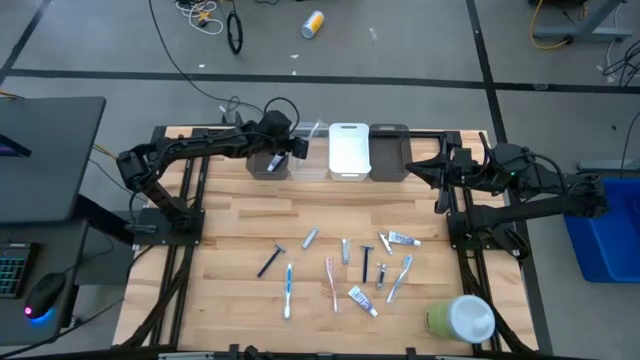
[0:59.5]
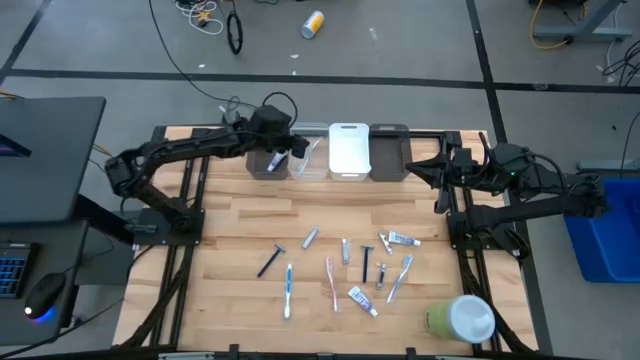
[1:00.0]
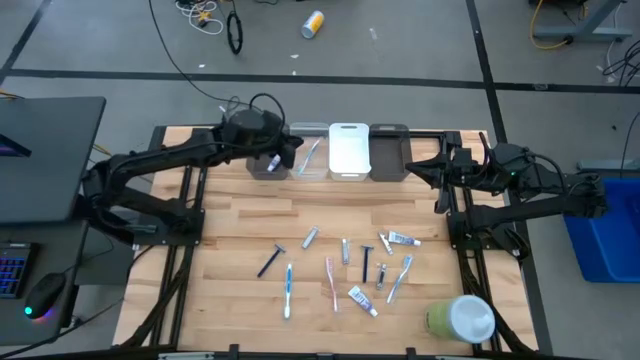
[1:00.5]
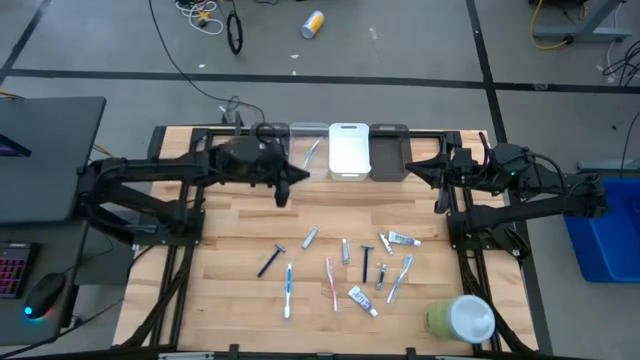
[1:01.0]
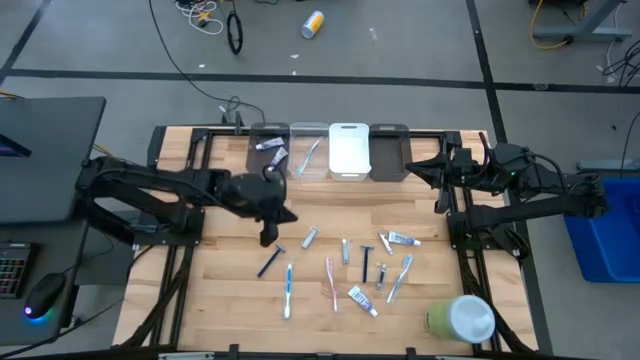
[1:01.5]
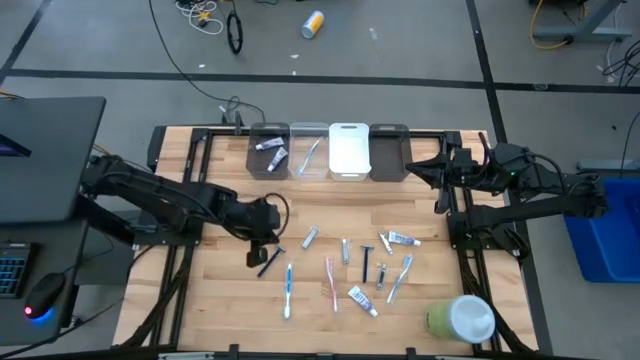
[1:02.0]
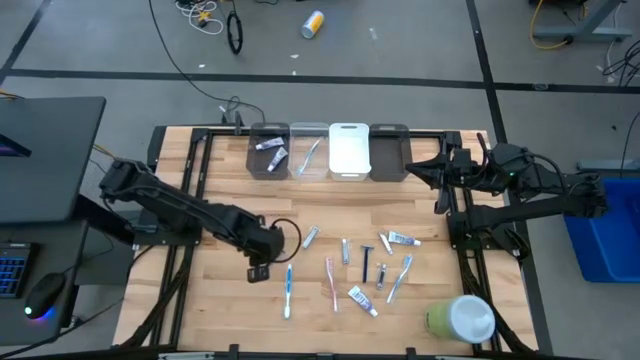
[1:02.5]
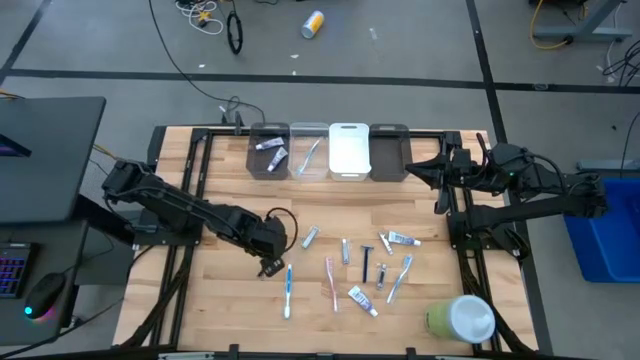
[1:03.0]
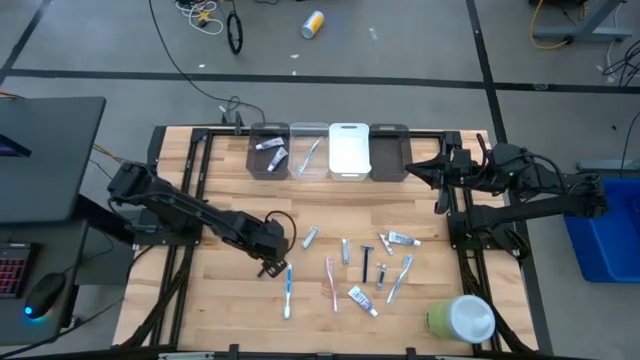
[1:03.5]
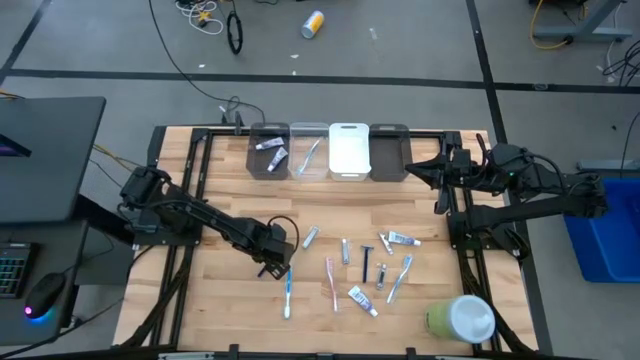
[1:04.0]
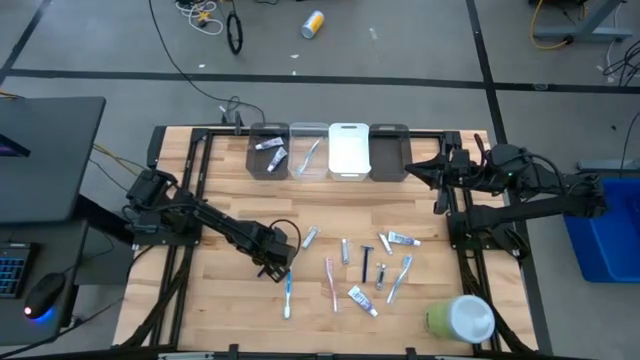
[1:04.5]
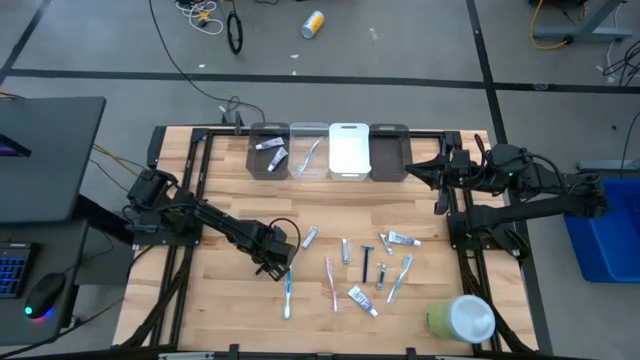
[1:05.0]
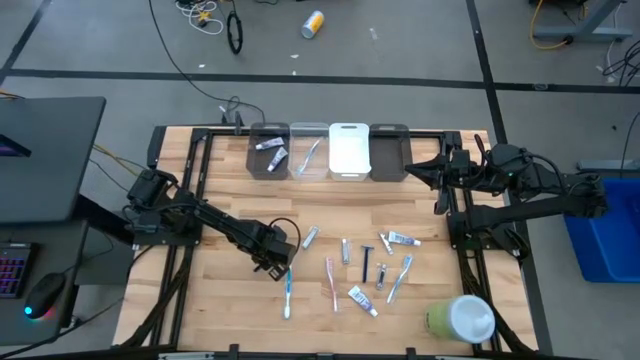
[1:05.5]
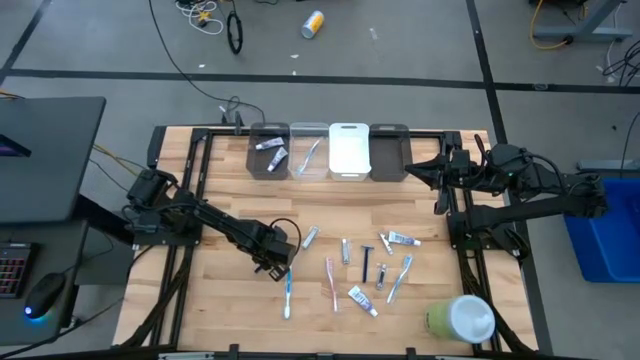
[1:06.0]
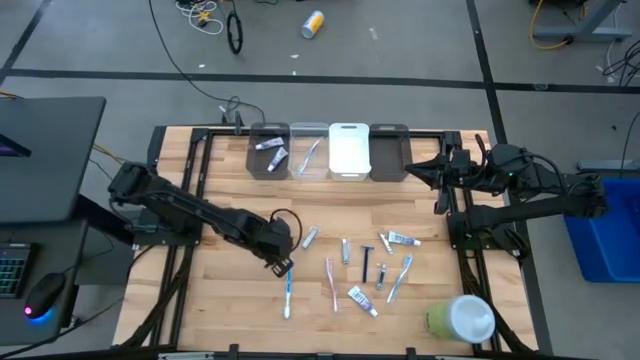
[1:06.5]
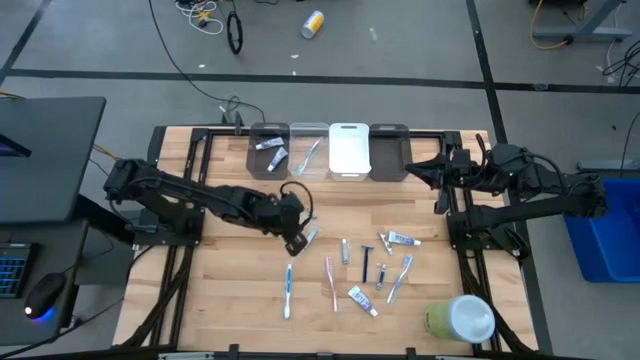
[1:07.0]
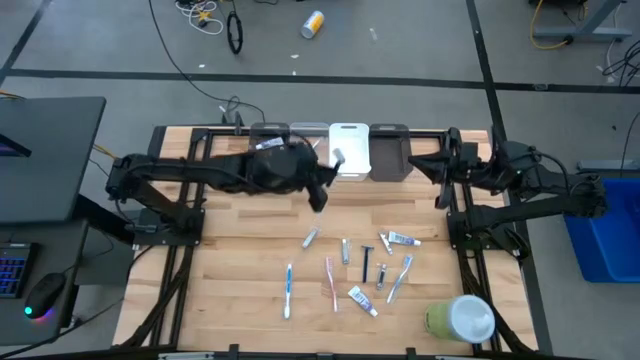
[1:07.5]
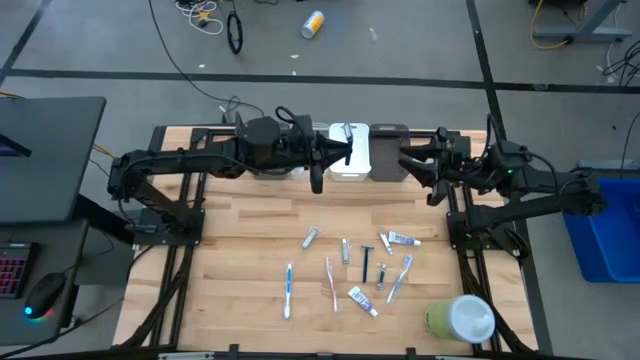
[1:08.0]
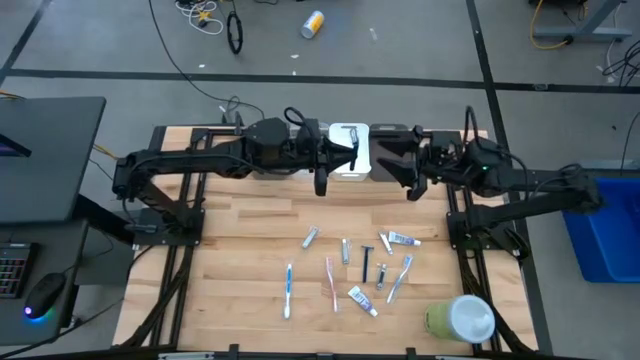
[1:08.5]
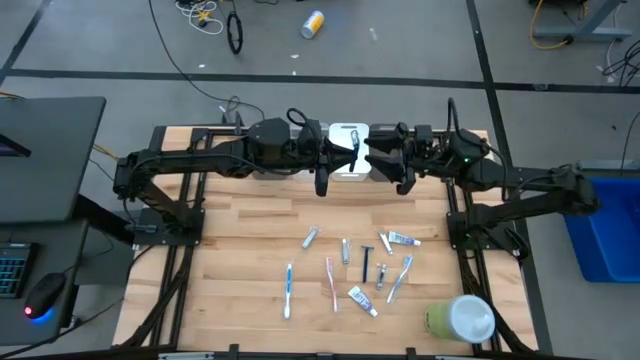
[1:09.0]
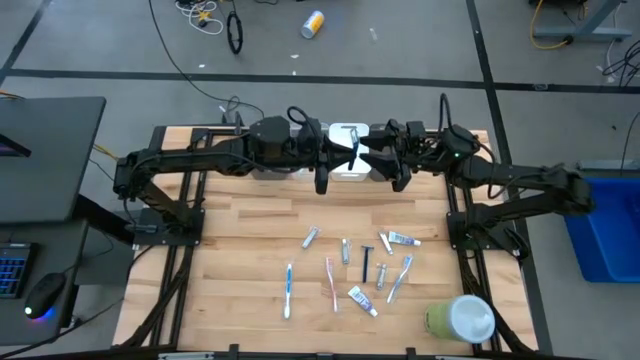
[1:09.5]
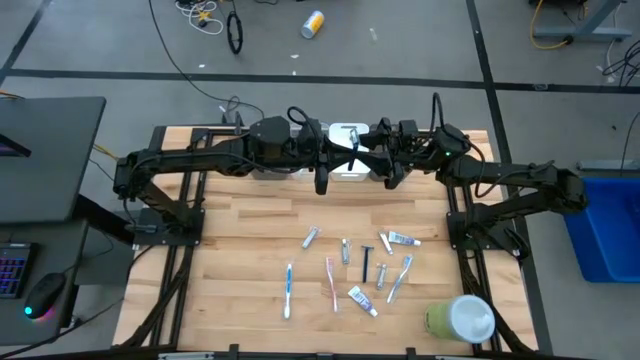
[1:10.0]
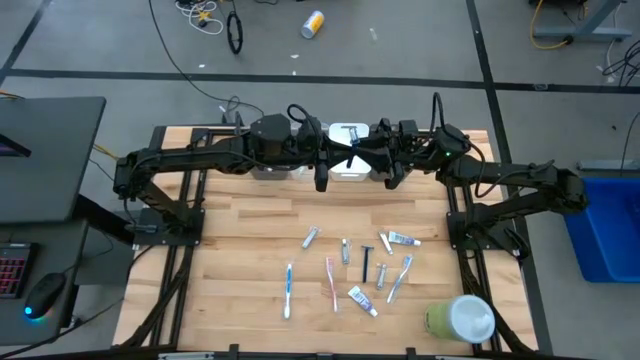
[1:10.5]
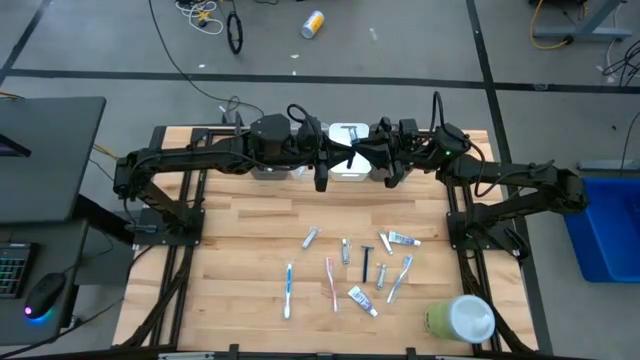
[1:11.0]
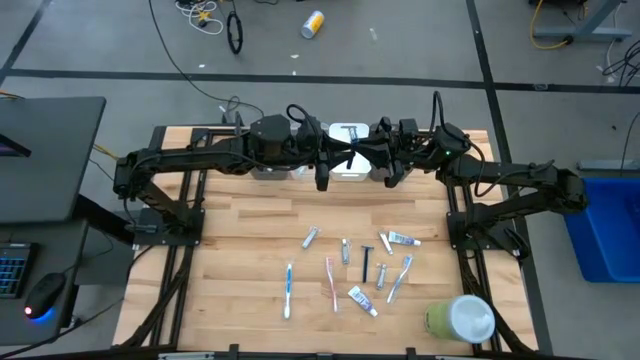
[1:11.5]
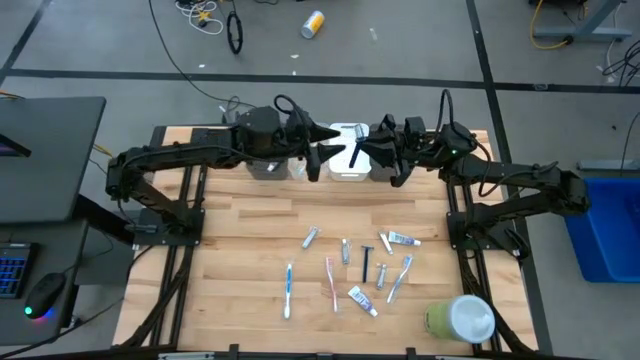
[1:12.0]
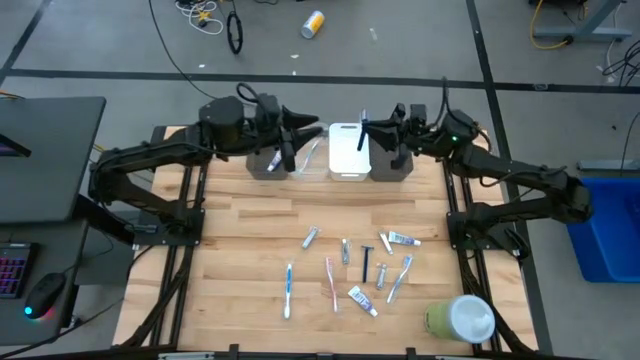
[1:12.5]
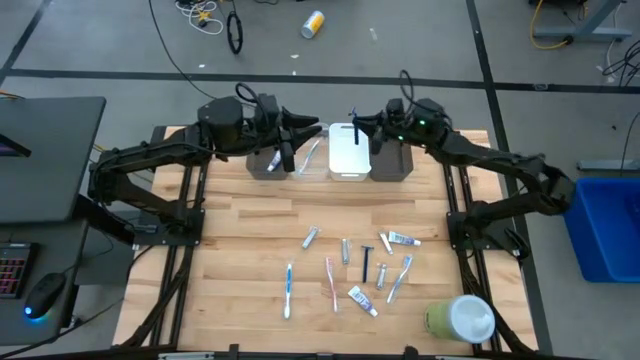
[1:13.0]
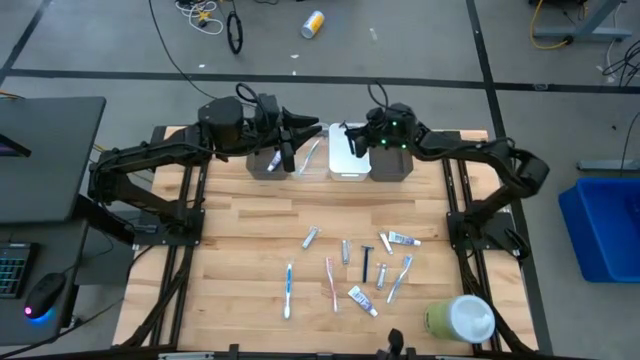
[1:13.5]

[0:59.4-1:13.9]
Task: Pick & Place Travel size toiletries
Put the blue razor into the white bin
